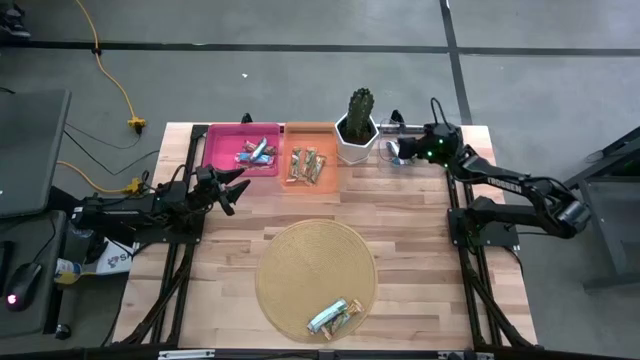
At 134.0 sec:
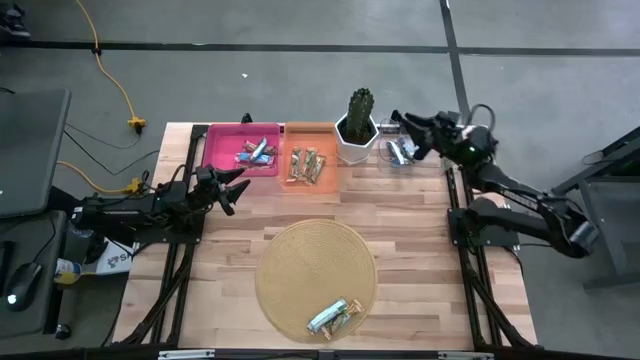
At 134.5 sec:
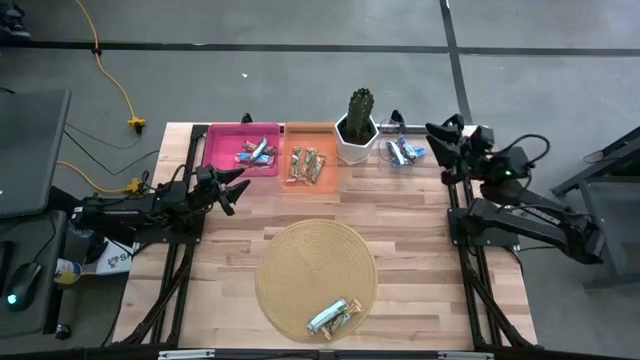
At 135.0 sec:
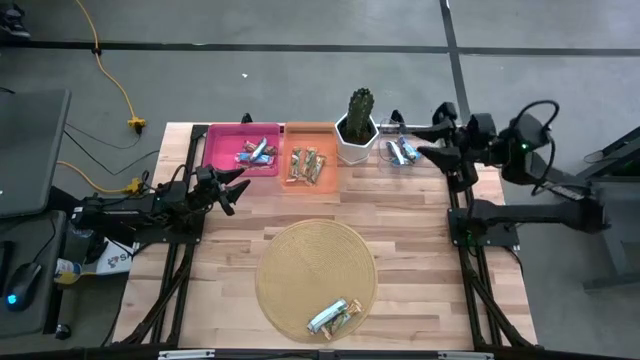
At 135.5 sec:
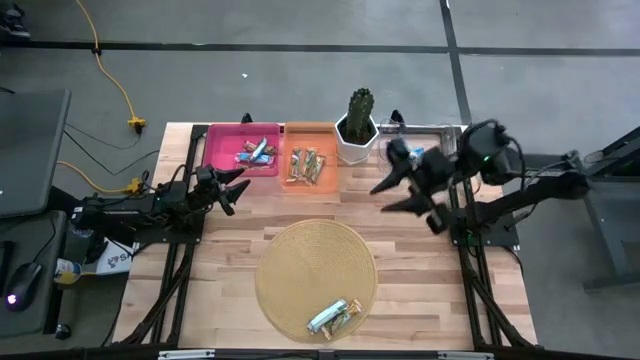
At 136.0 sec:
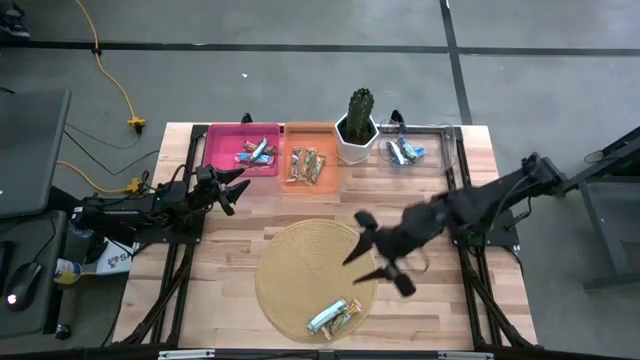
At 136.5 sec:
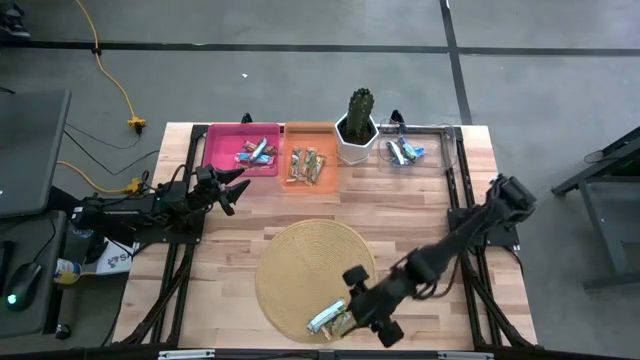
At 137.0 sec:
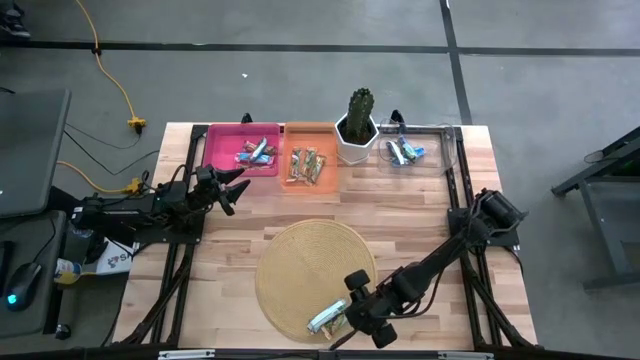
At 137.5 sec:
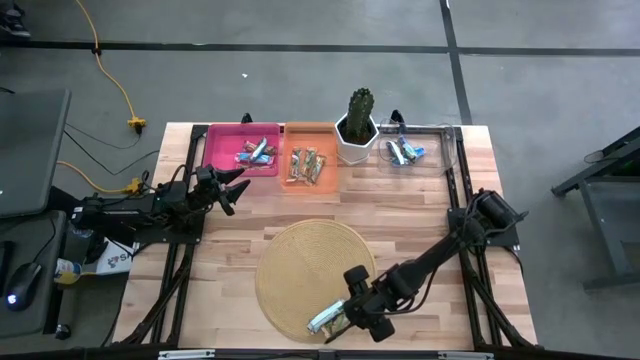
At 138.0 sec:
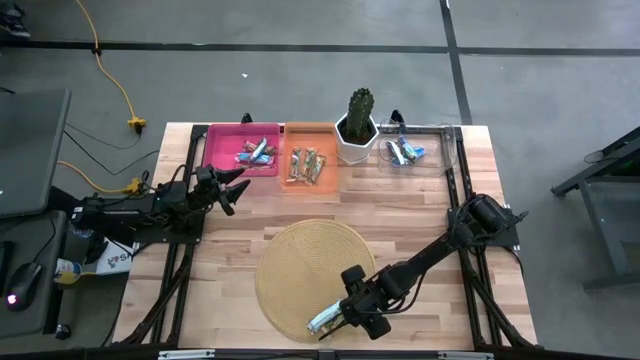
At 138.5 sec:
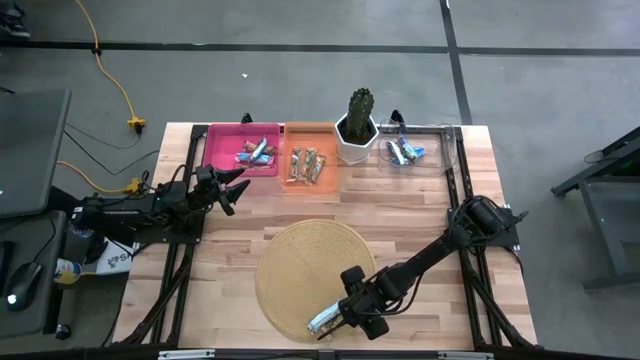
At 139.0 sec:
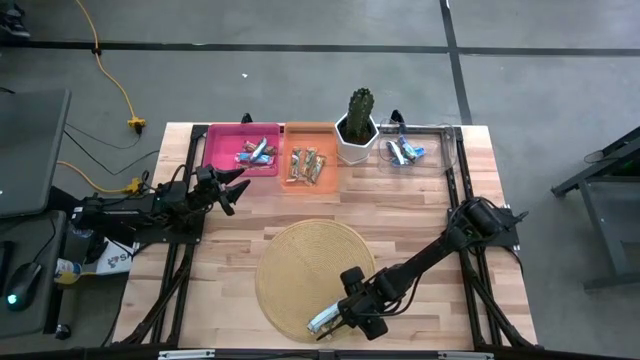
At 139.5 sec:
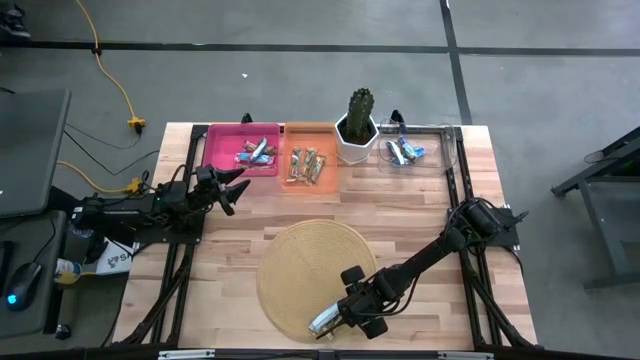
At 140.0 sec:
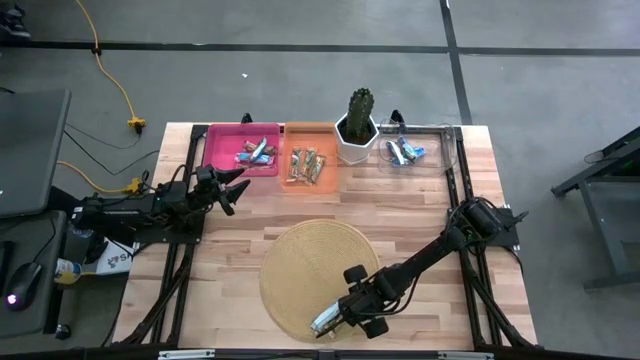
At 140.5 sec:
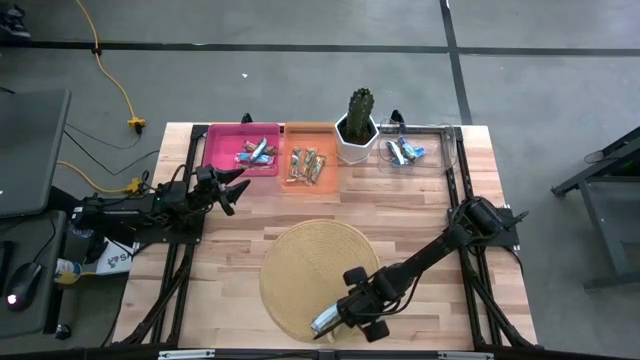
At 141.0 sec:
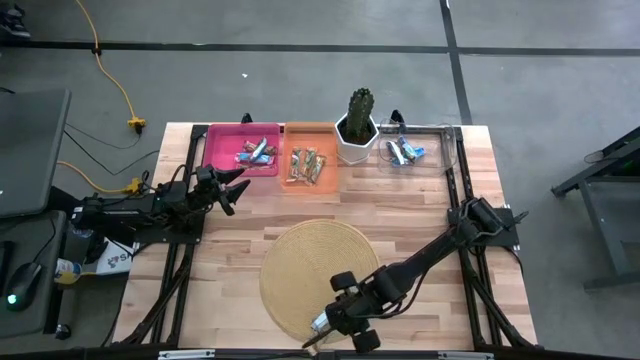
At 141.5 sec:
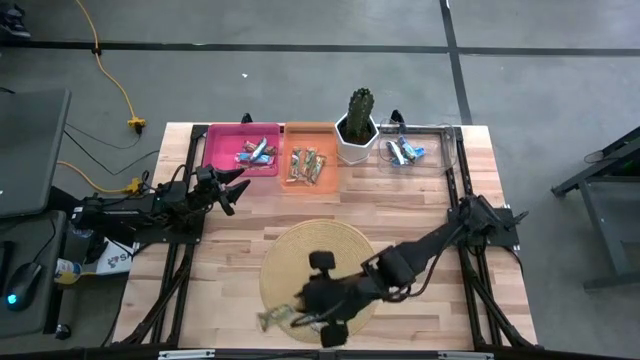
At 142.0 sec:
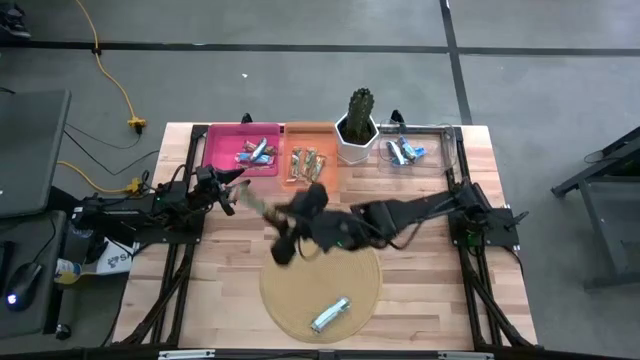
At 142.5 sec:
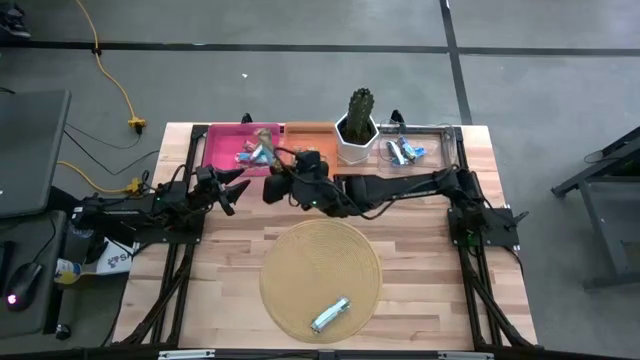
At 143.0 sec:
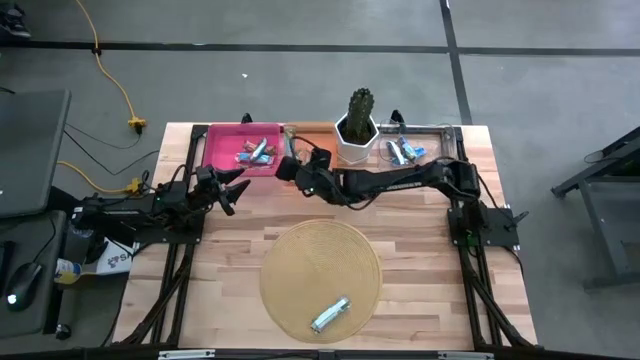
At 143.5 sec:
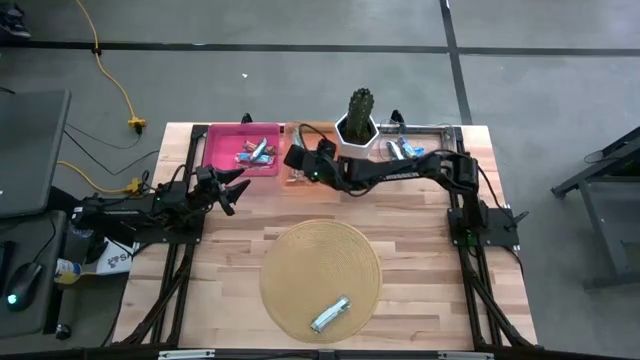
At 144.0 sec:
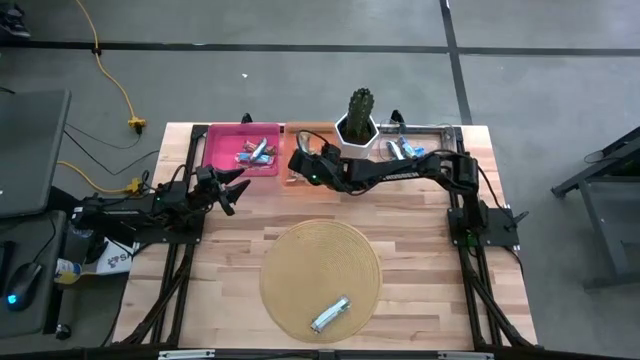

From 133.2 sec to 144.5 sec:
Task: Pick and place Granola Bars by type
Put the yellow granola bar into the orange bin

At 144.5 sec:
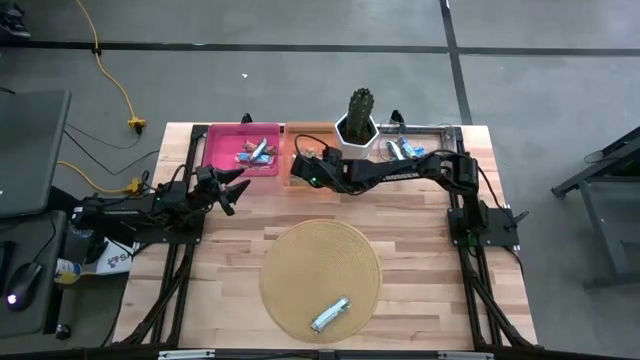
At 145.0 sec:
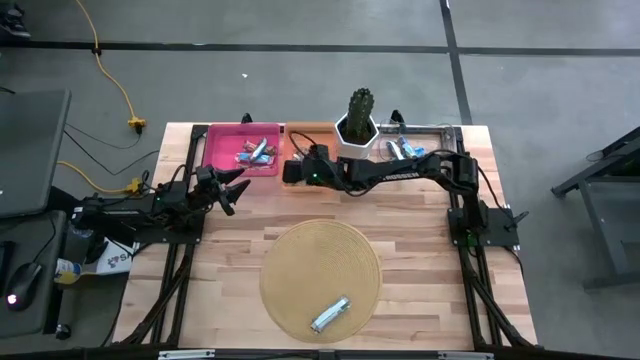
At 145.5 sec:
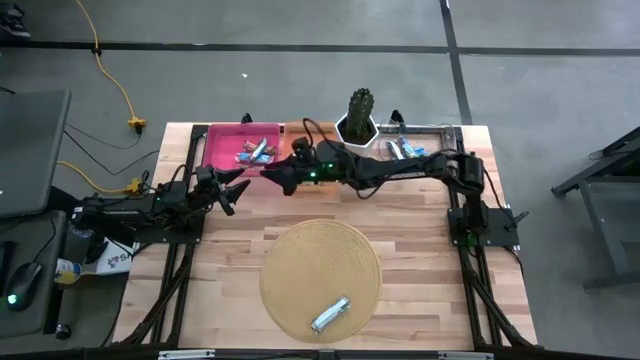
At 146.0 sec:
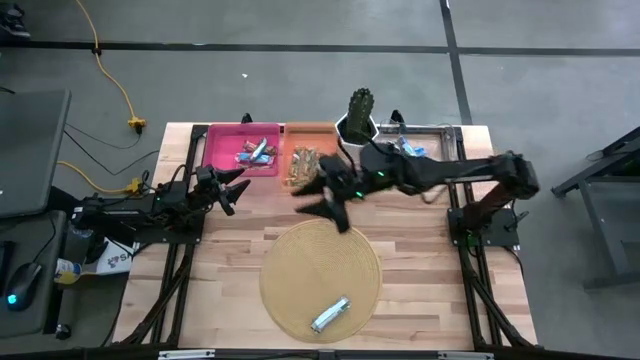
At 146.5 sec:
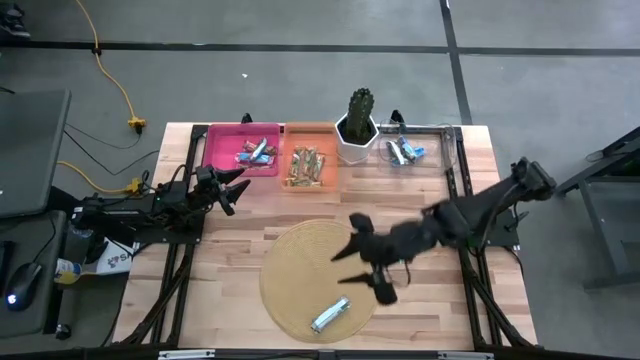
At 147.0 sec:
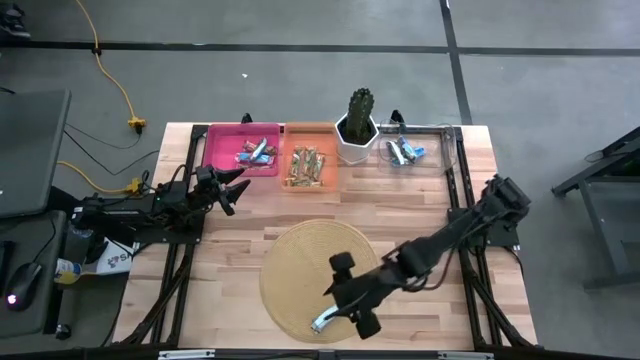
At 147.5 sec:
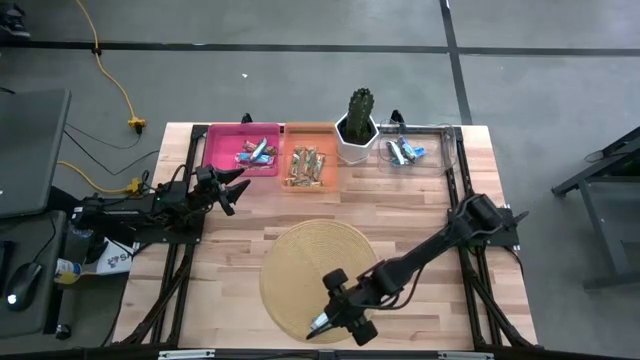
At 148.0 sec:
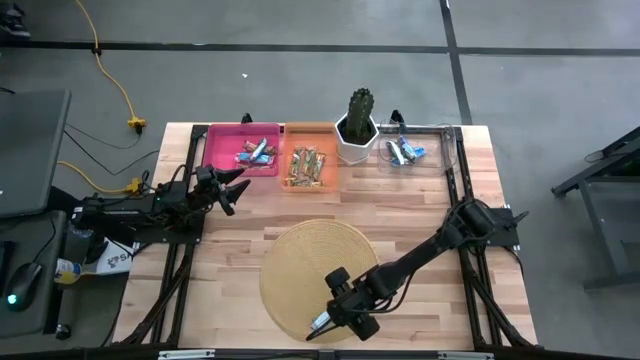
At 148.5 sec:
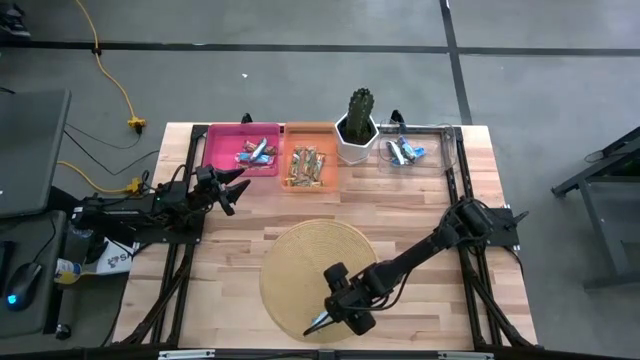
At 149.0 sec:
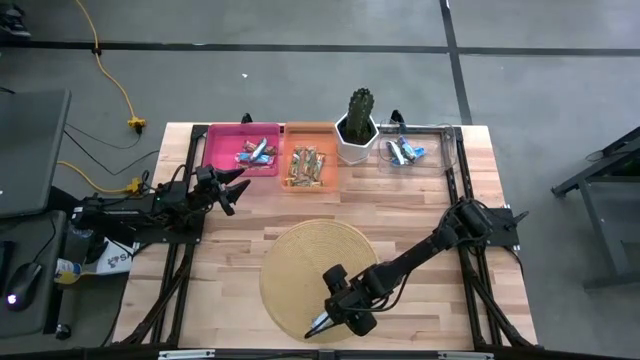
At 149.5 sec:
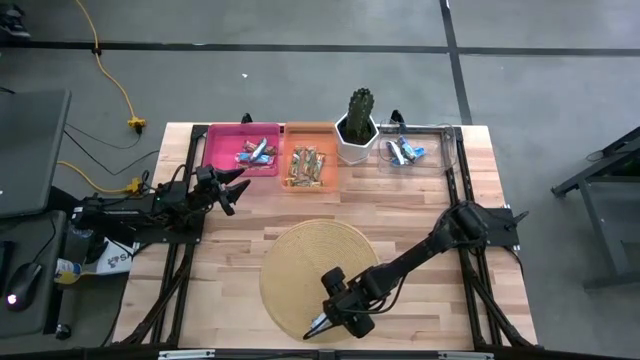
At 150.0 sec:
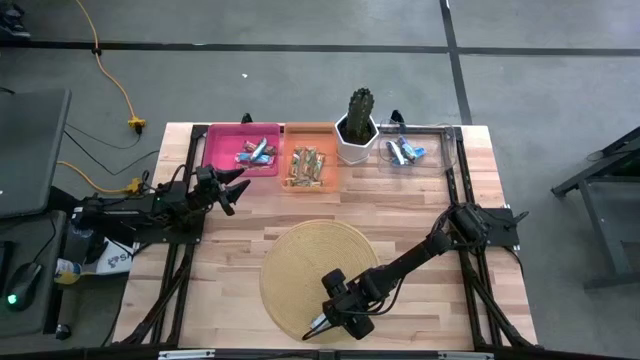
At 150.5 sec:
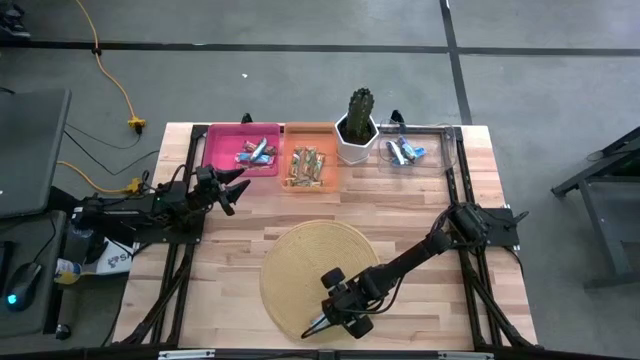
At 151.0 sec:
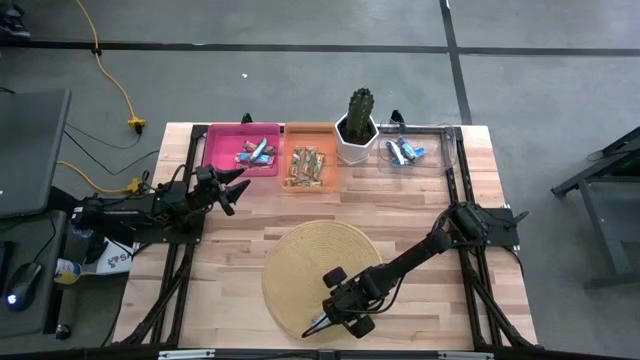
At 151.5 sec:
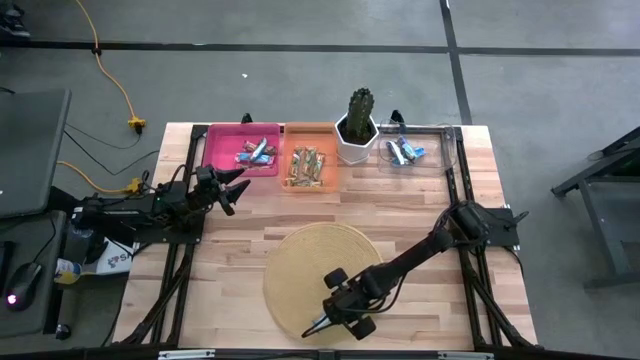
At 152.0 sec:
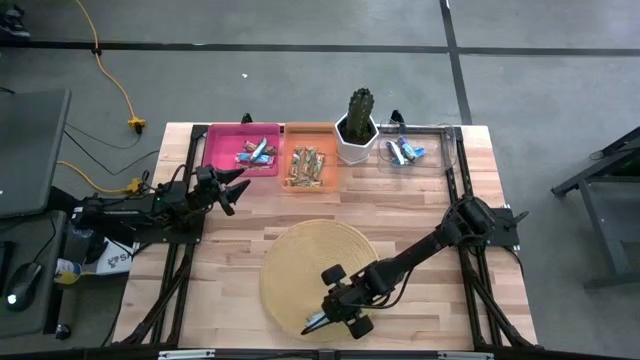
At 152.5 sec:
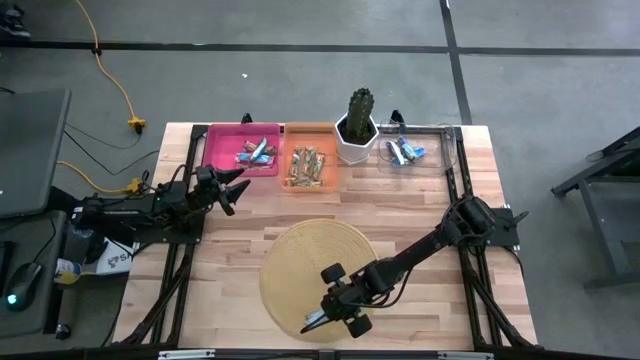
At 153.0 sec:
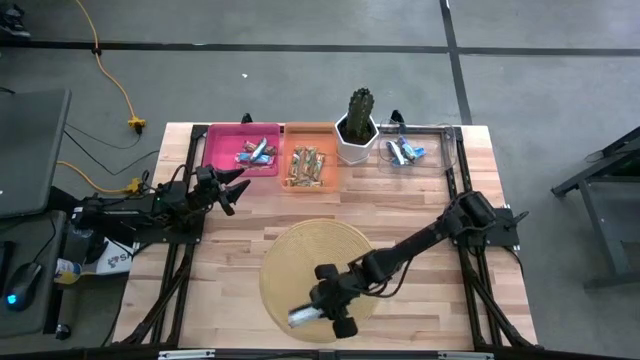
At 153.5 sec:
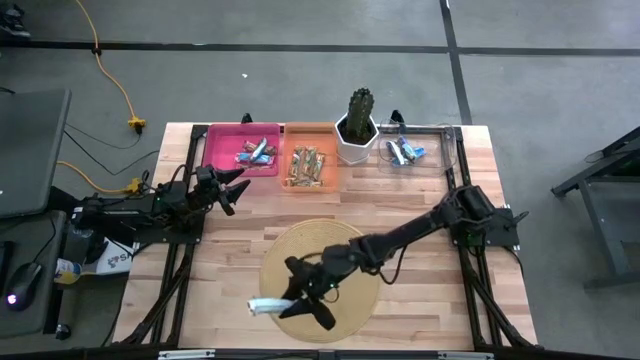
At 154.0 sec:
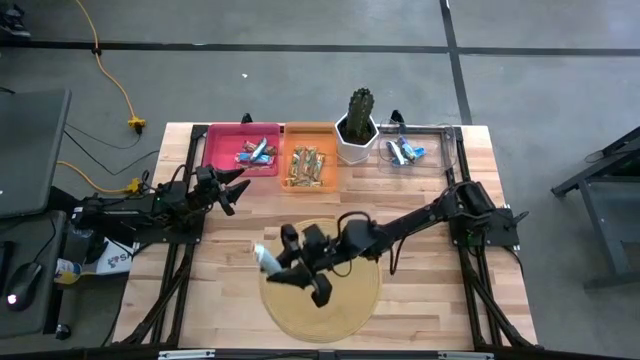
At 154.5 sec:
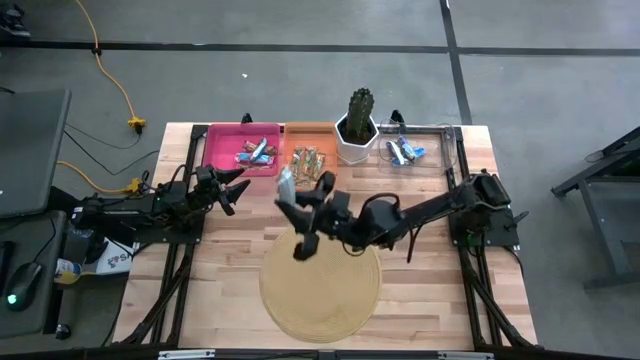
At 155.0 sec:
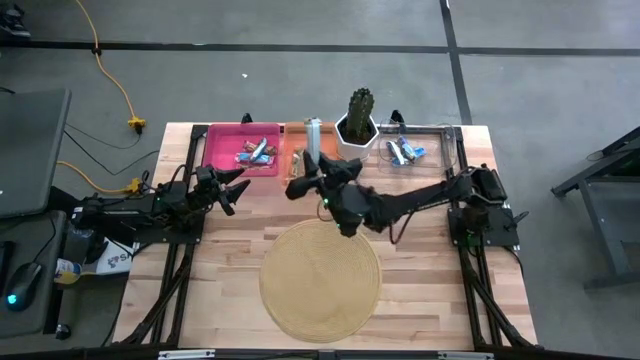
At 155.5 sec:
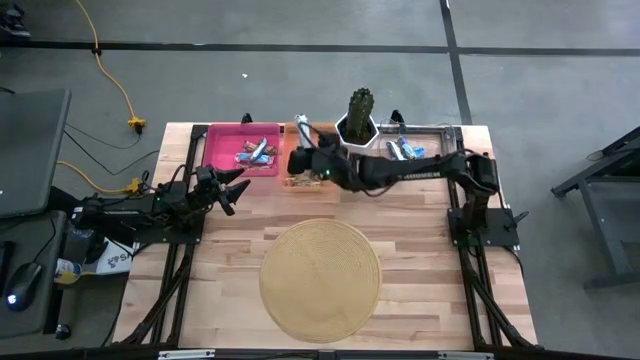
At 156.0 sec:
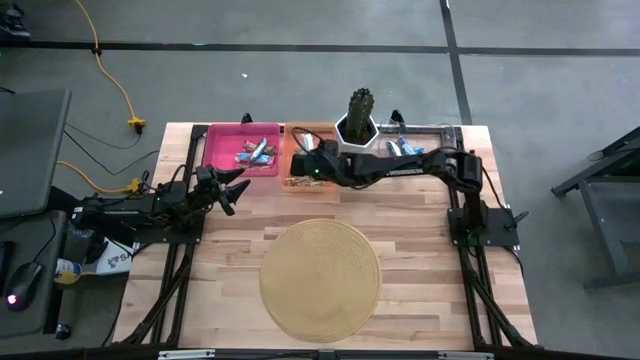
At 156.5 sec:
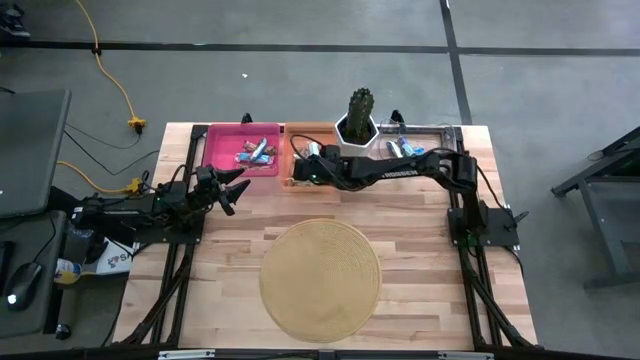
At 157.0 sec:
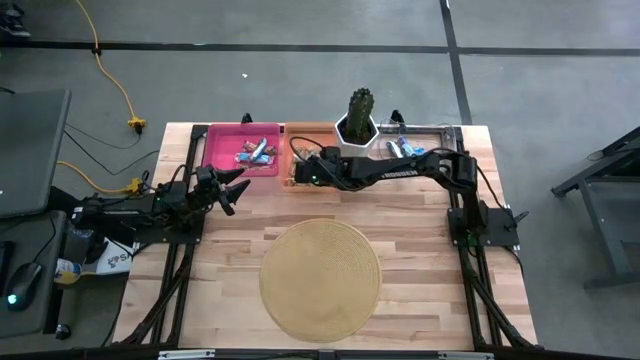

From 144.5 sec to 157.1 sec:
Put the yellow granola bar into the orange bin
